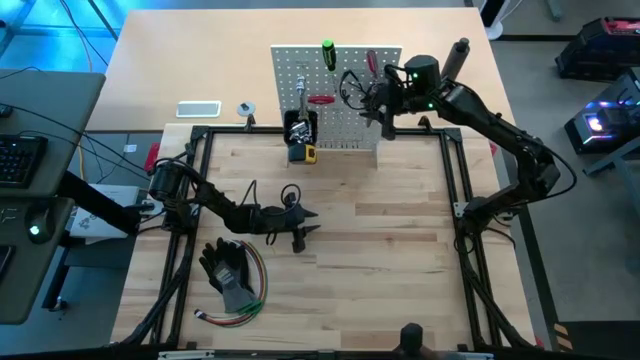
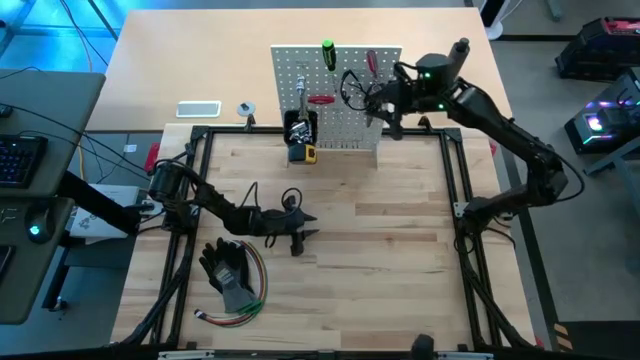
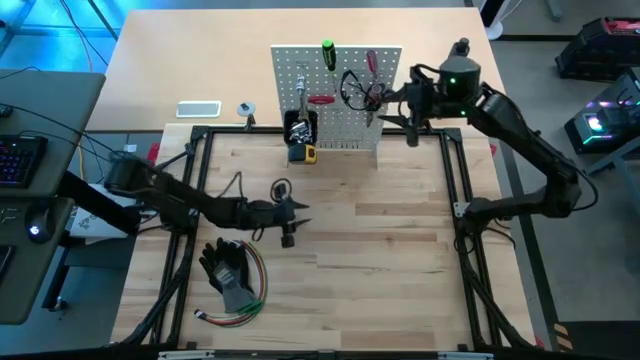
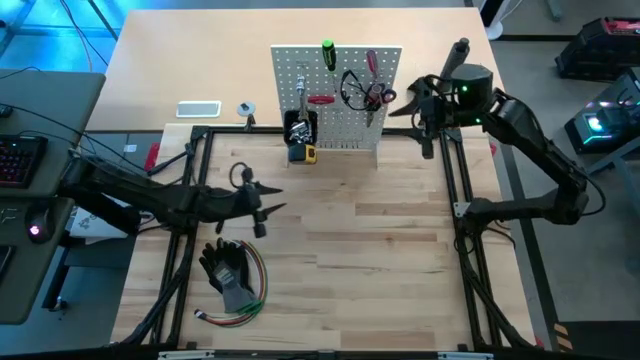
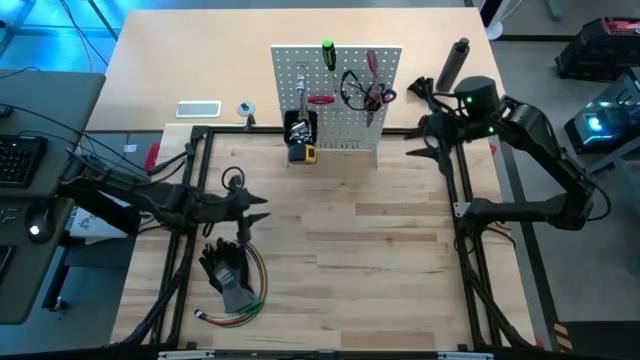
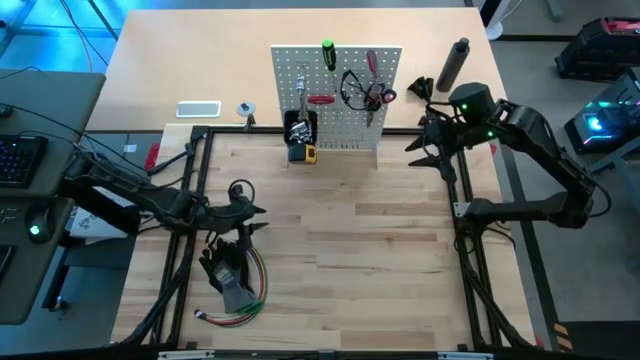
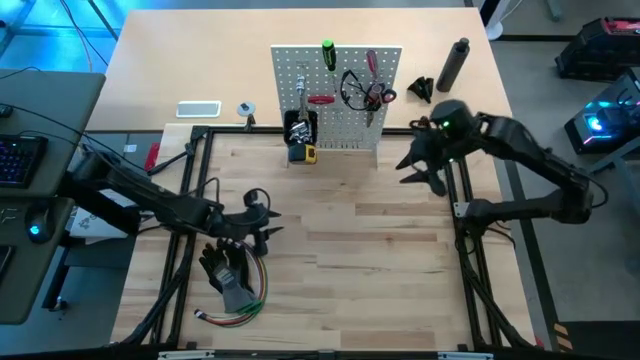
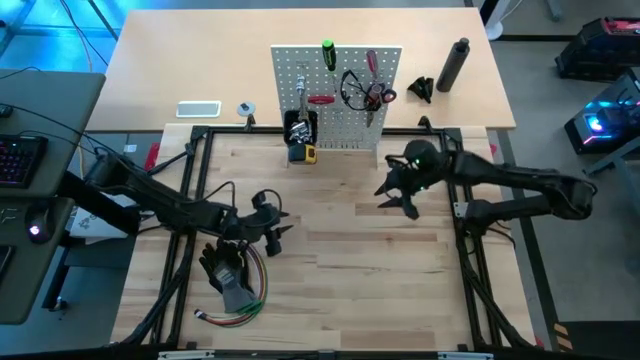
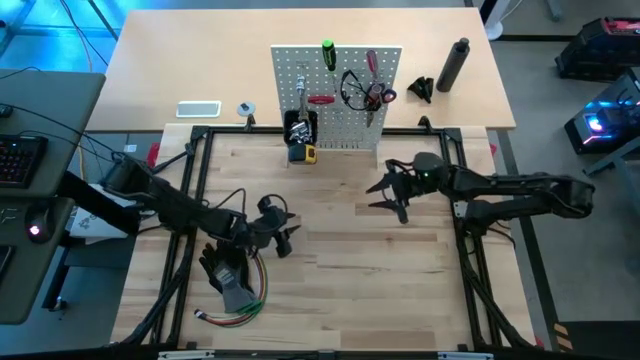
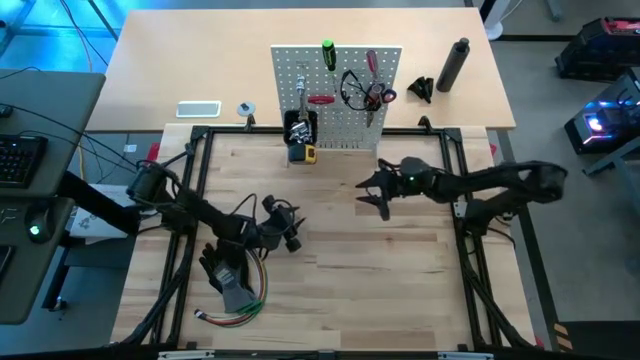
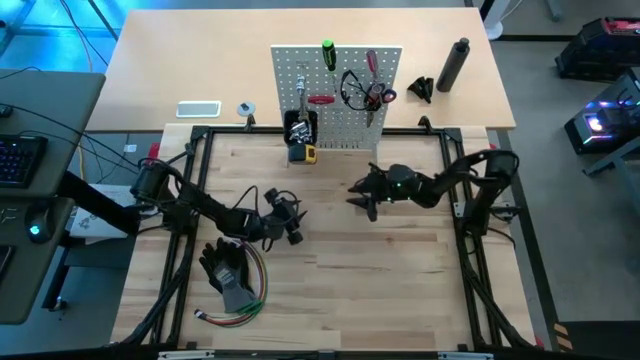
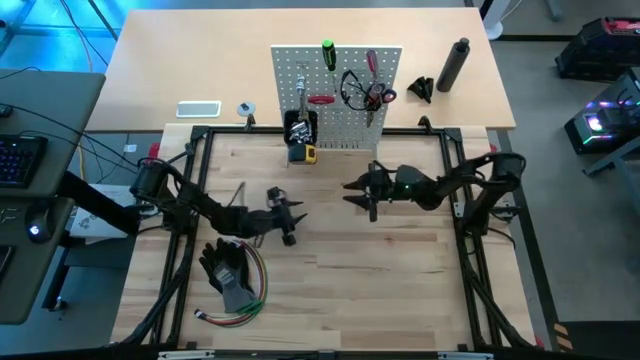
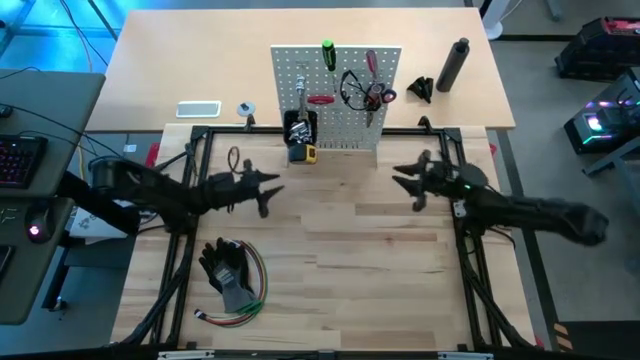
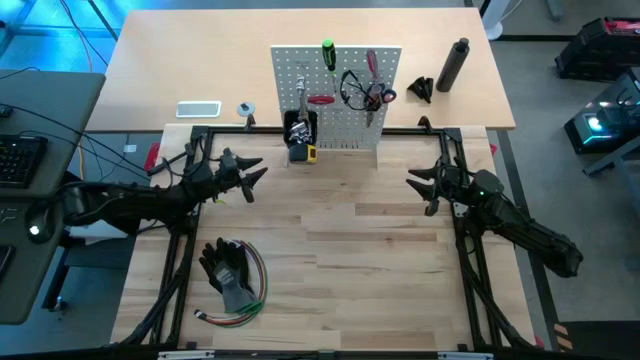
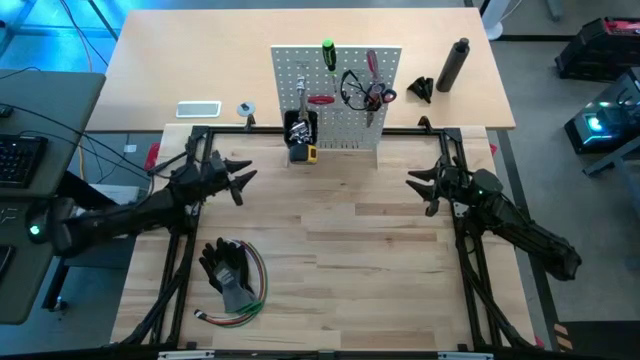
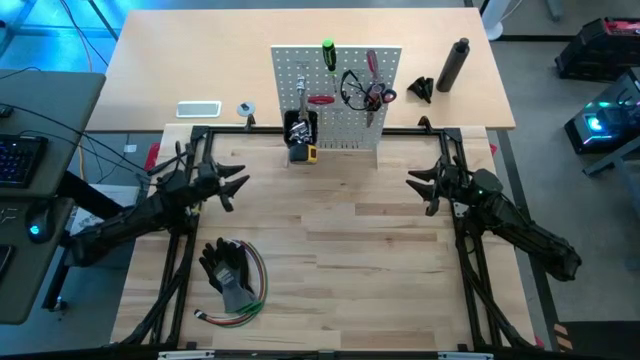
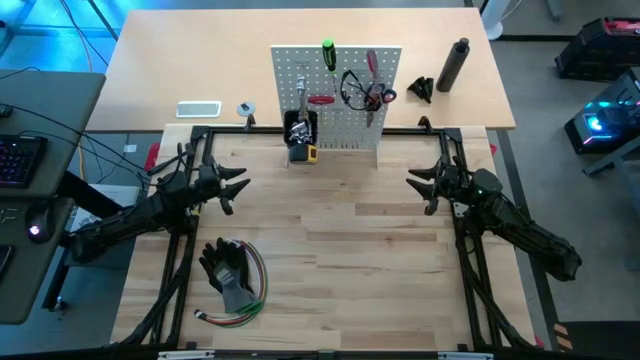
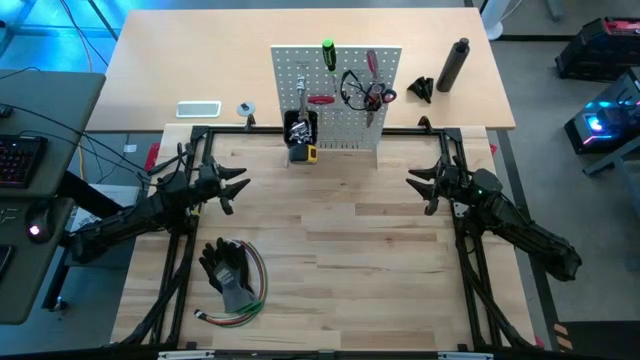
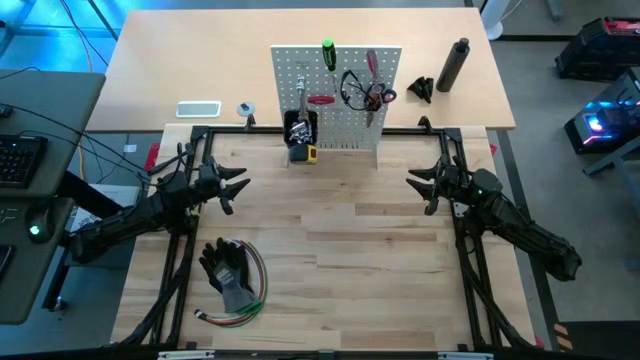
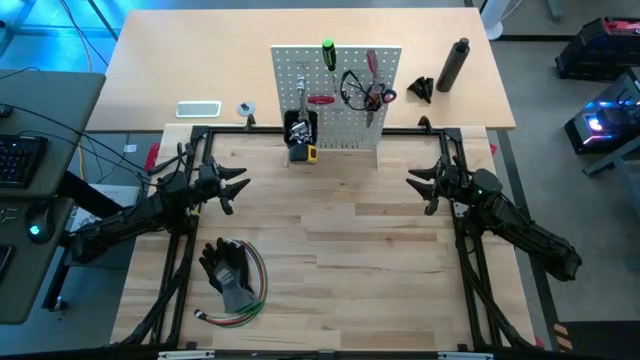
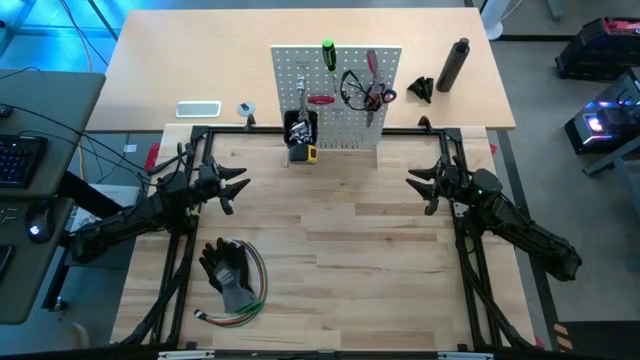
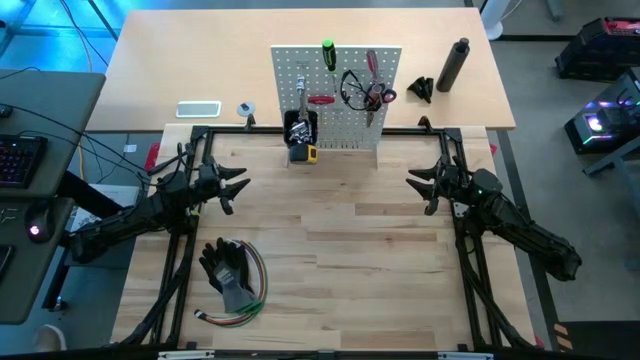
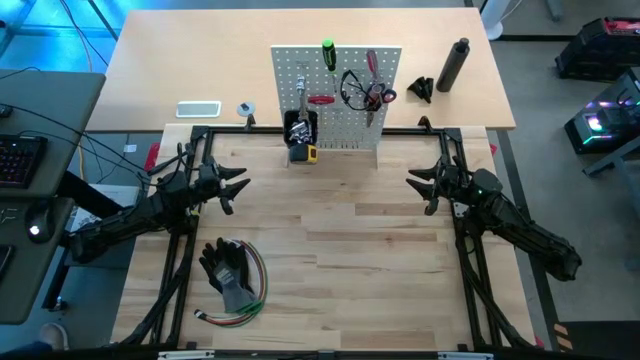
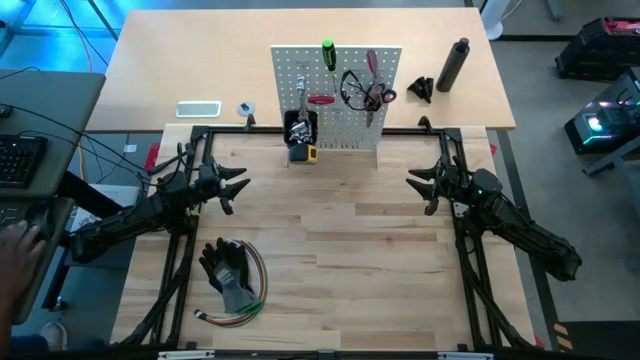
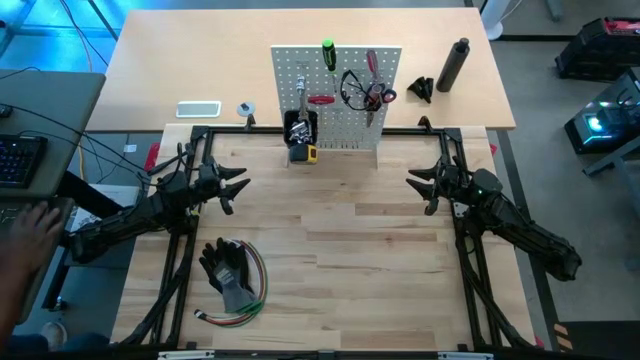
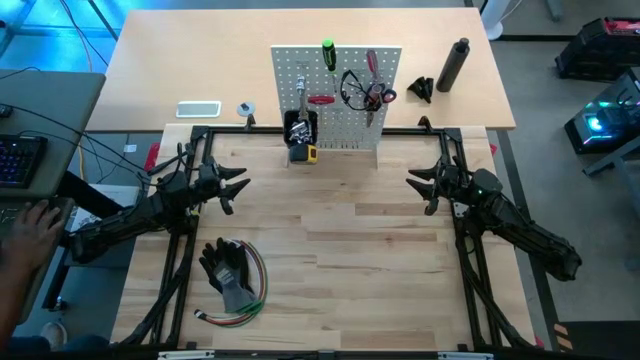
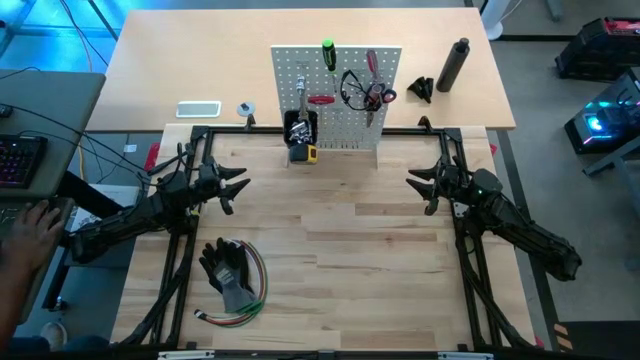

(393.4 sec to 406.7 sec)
Task: Hang tools onto peg board
Return to Home Position

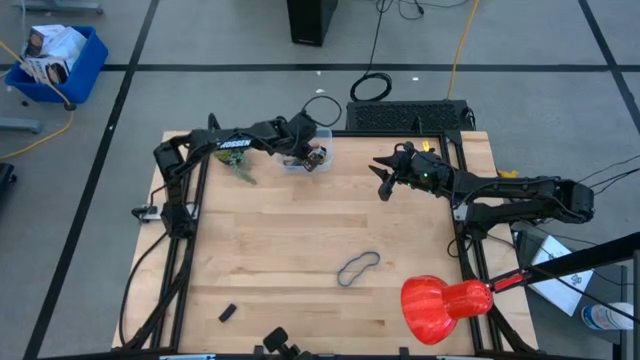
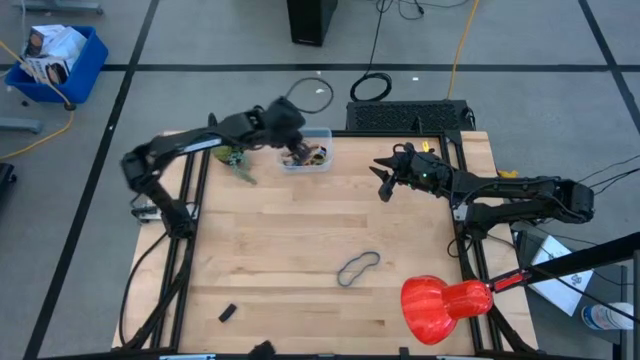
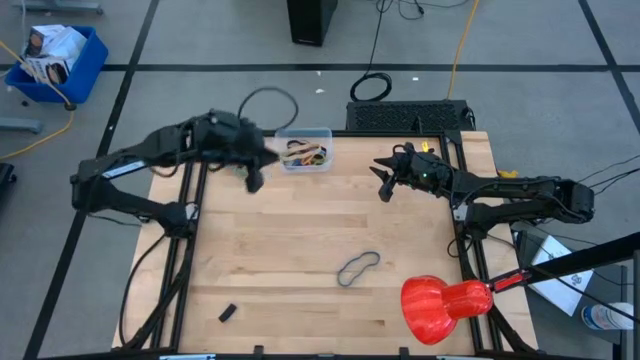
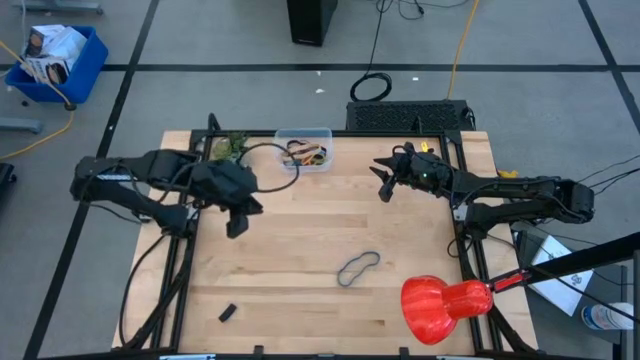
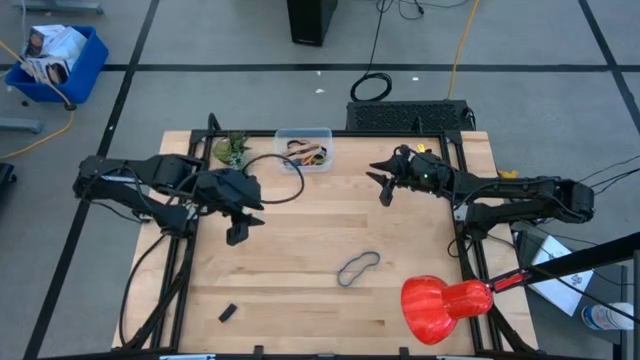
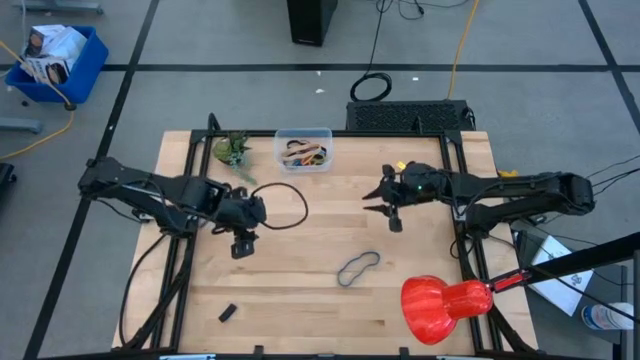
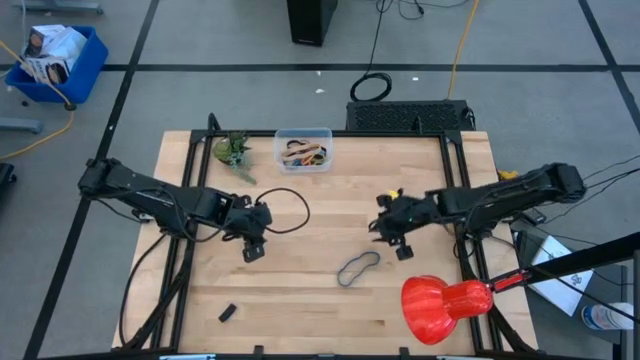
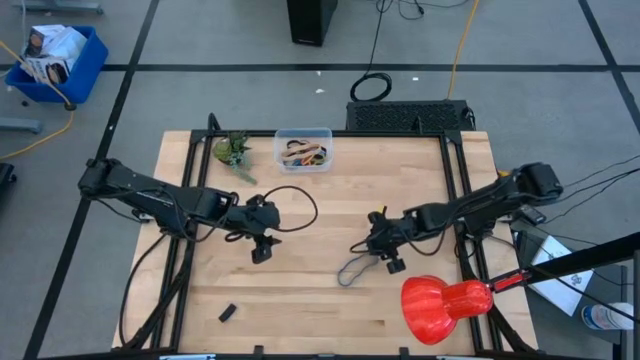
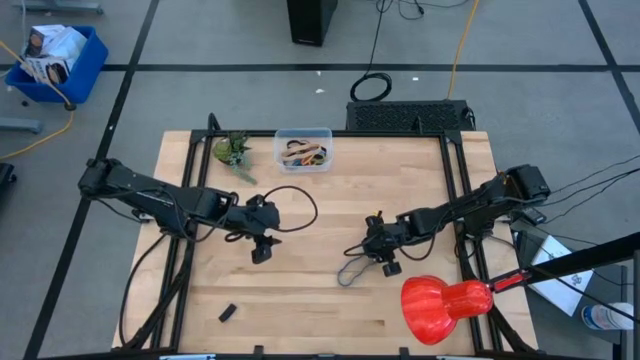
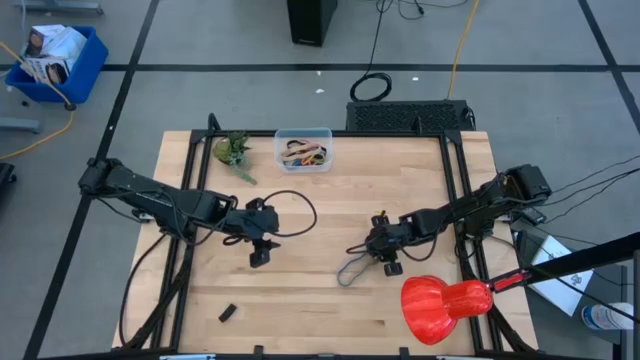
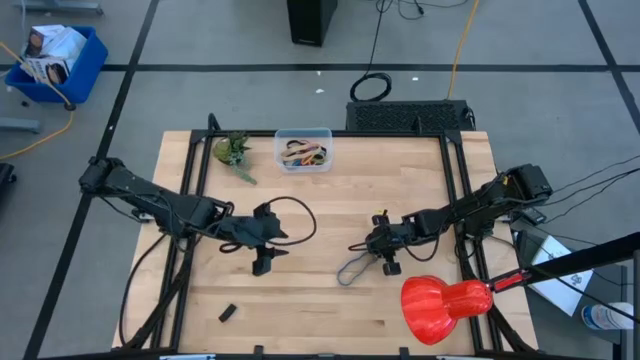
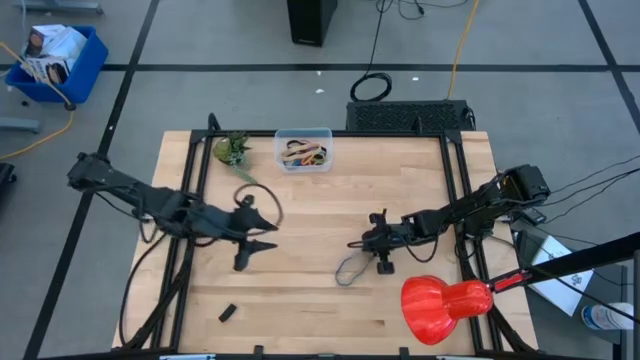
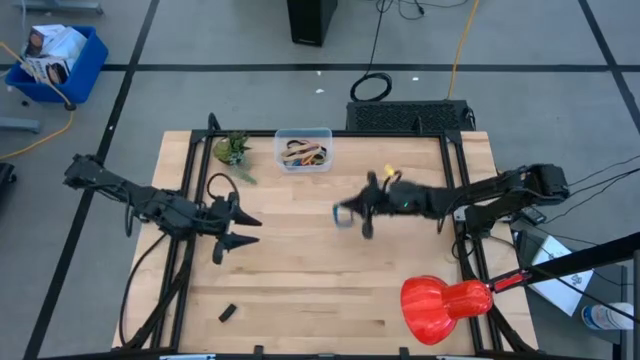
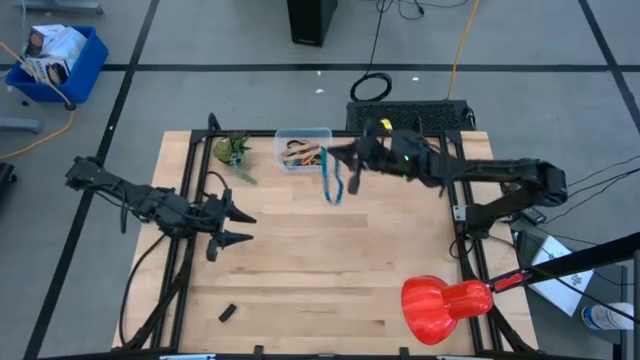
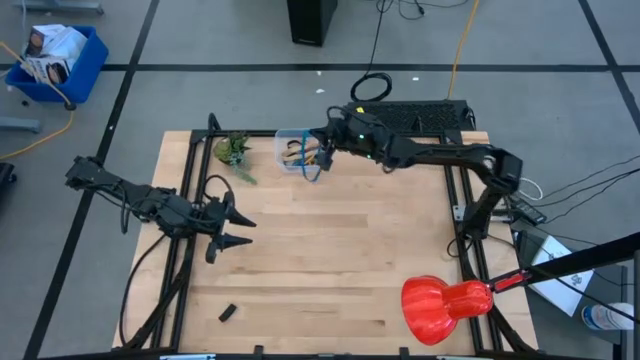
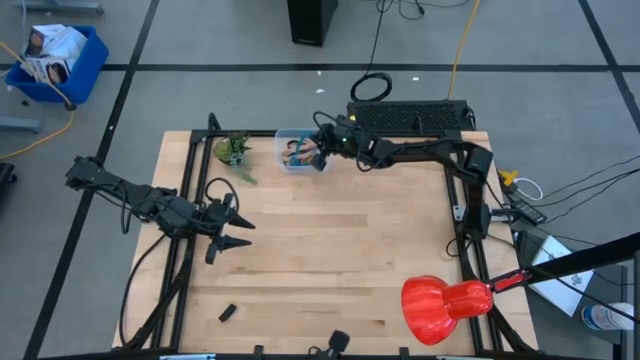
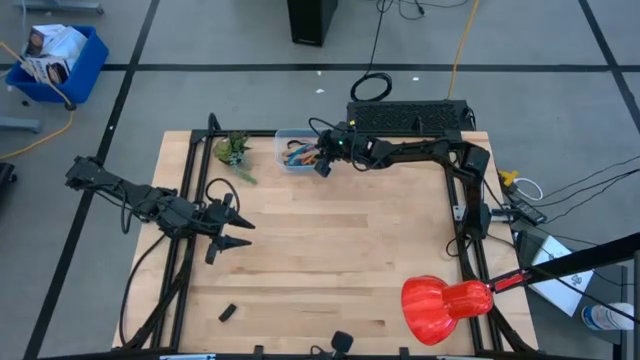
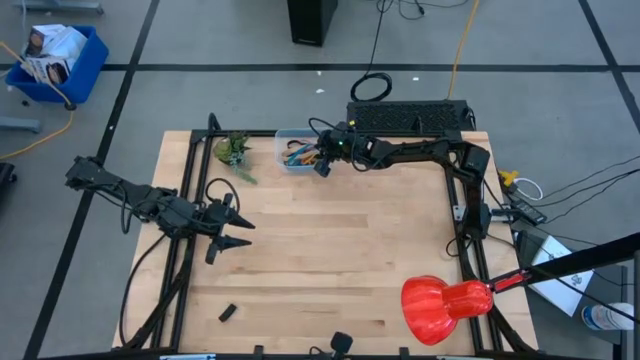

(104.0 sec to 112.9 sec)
Task: Pick and place rubber bands into bin
Put the dark blue rubber band into the transparent bin
